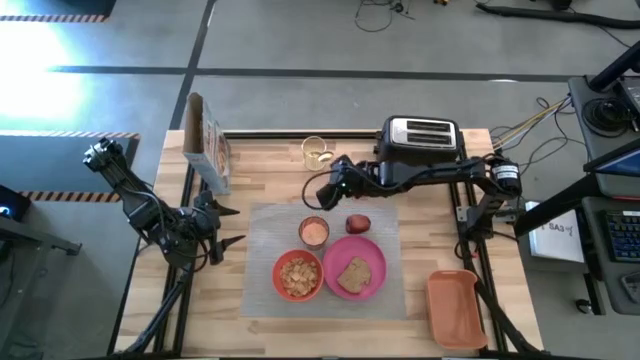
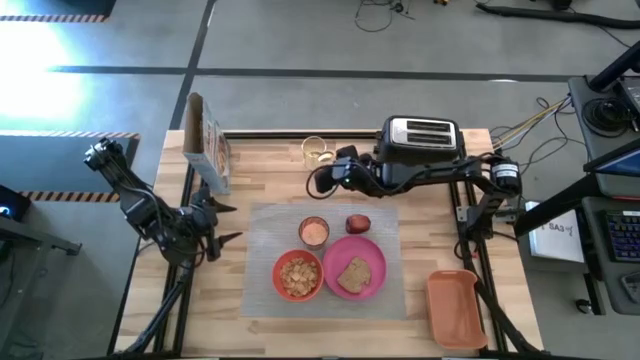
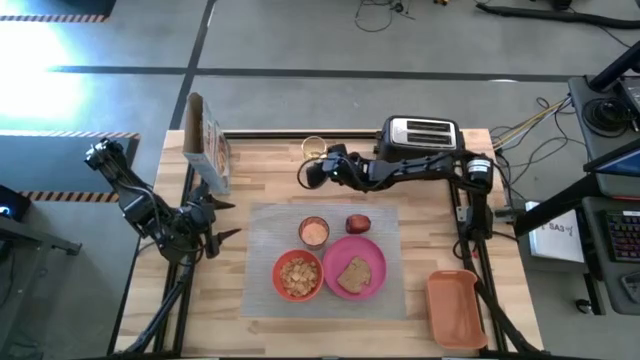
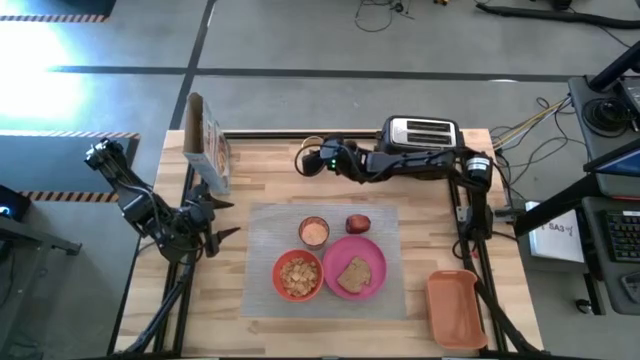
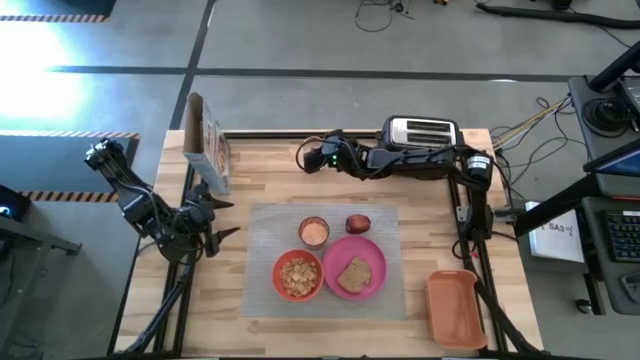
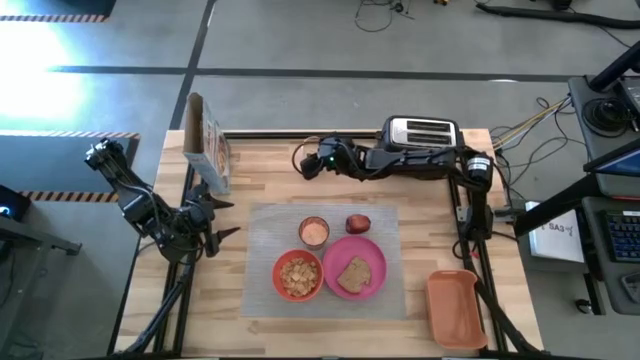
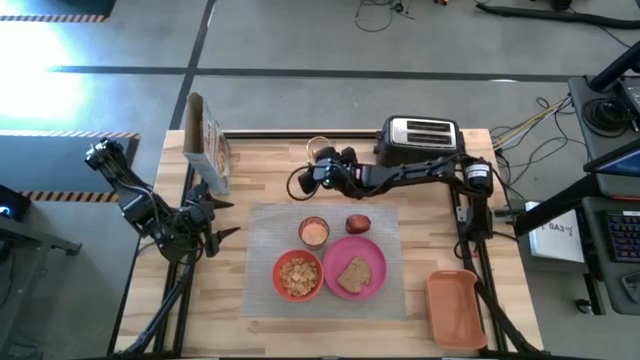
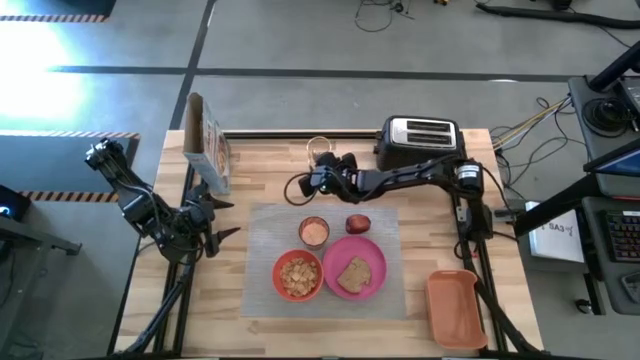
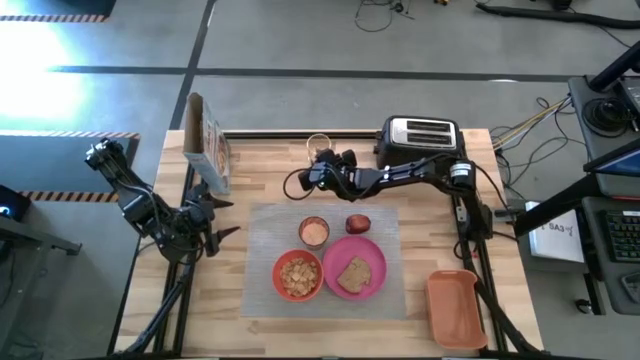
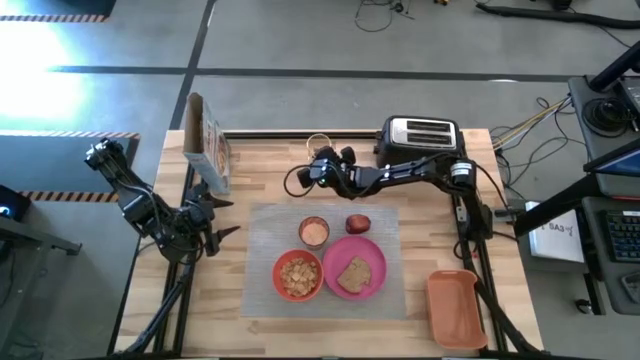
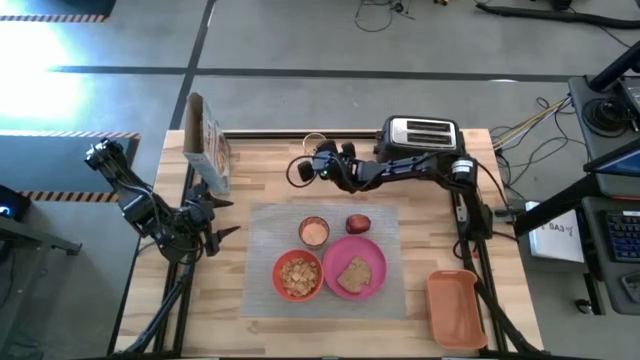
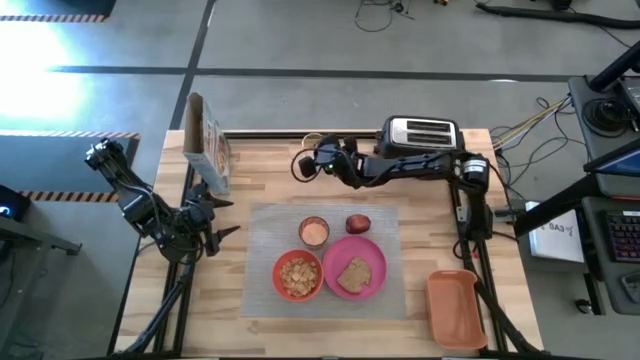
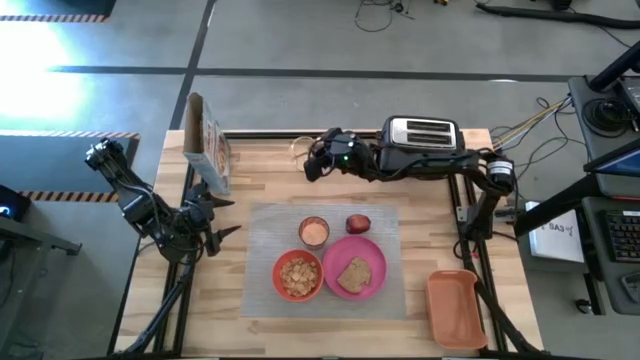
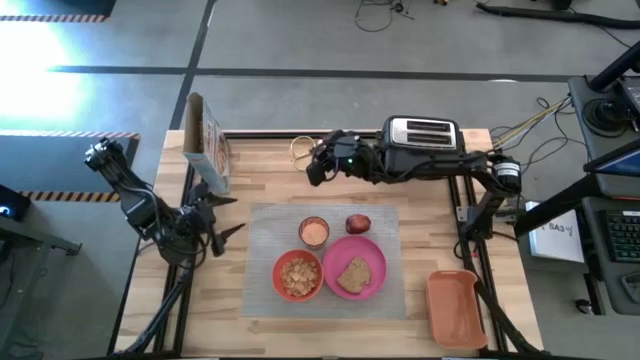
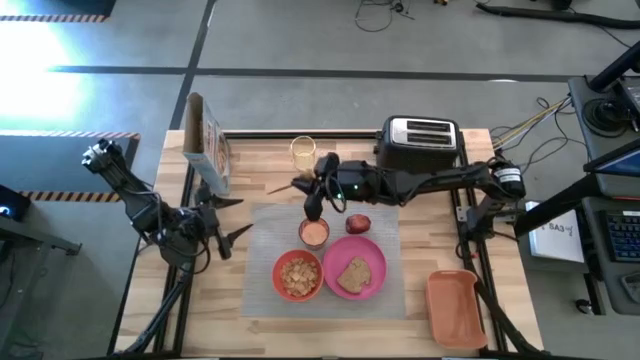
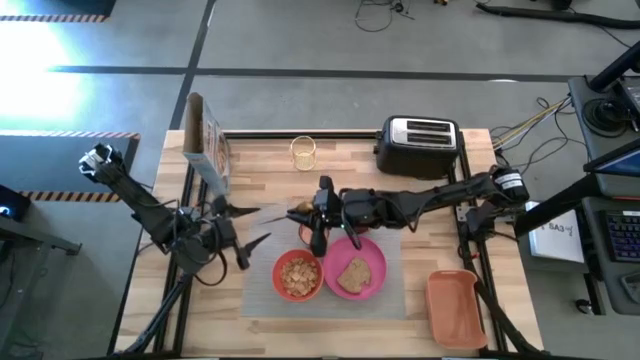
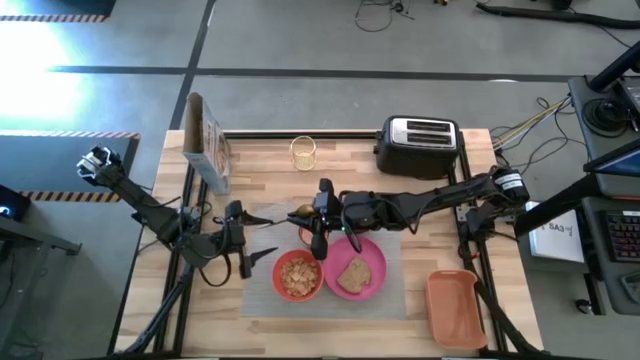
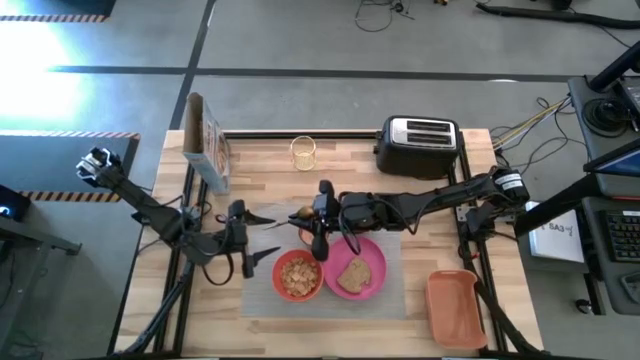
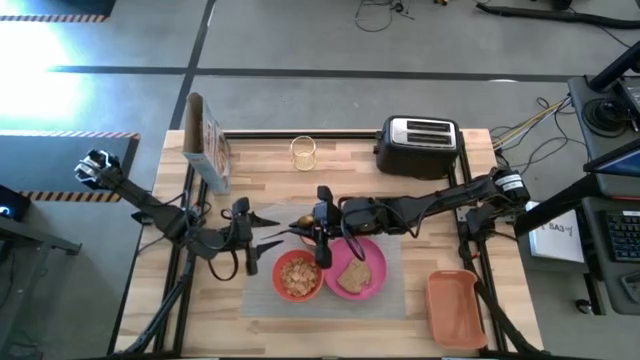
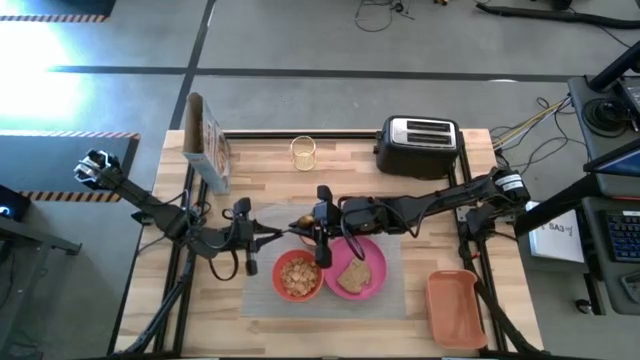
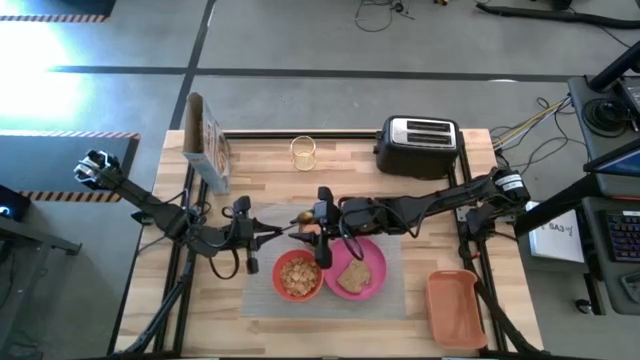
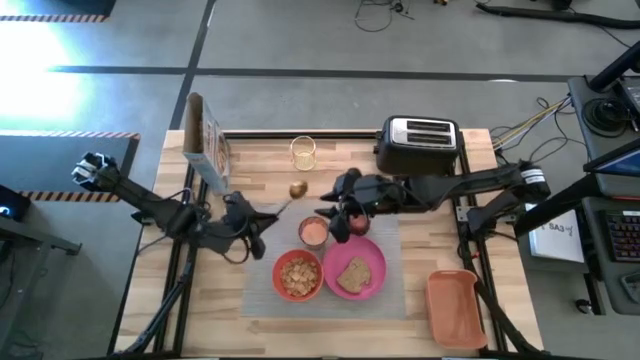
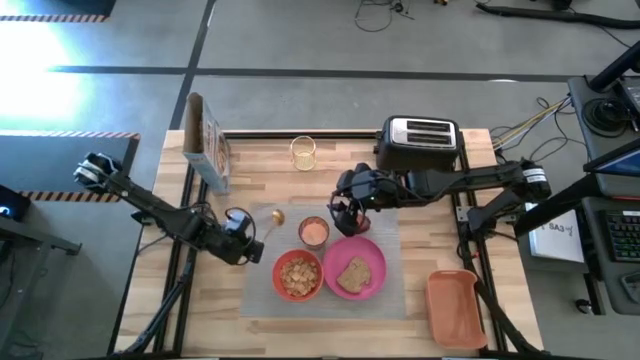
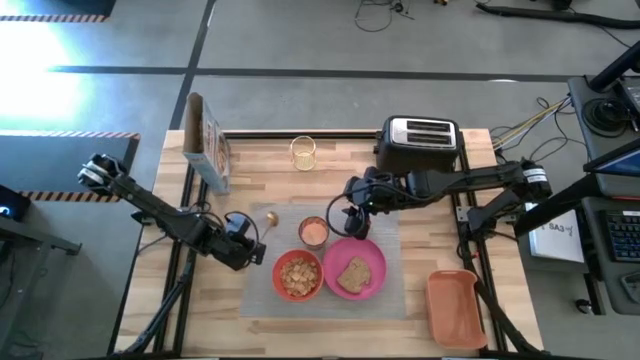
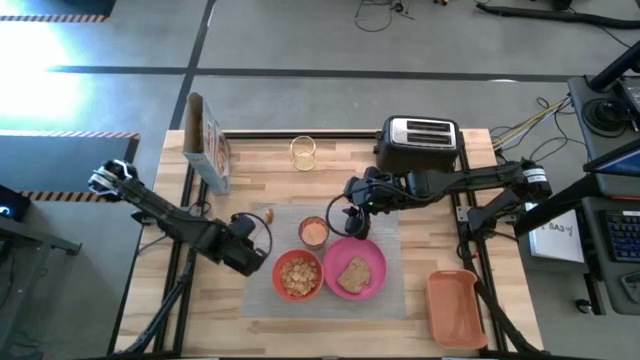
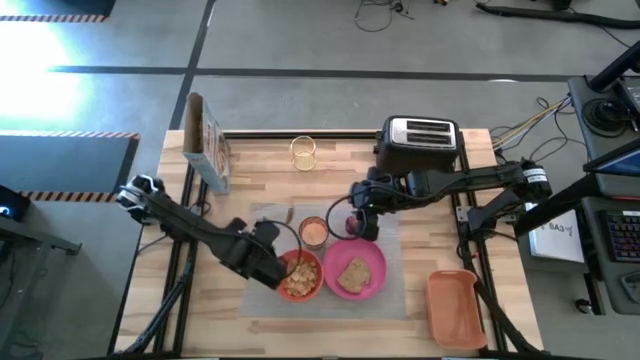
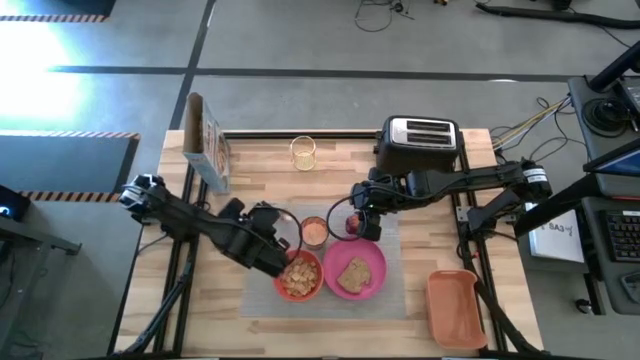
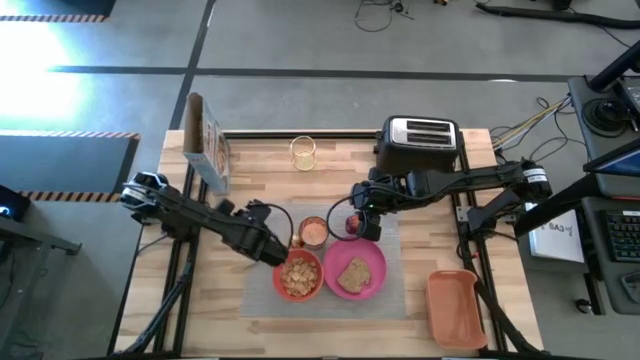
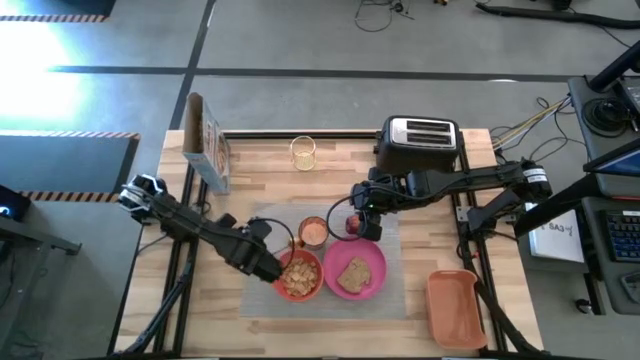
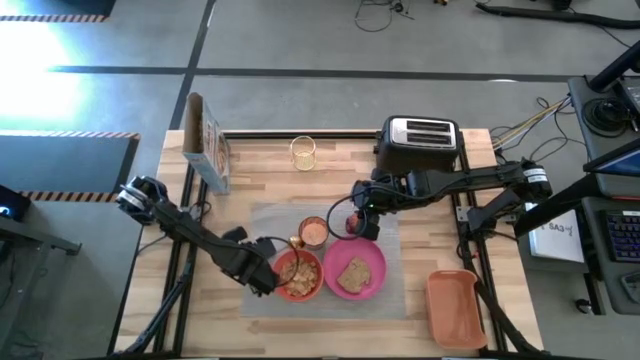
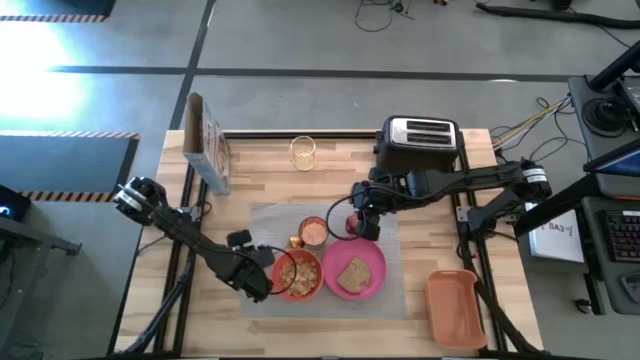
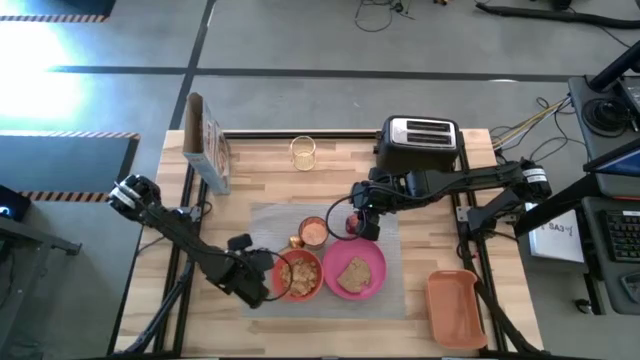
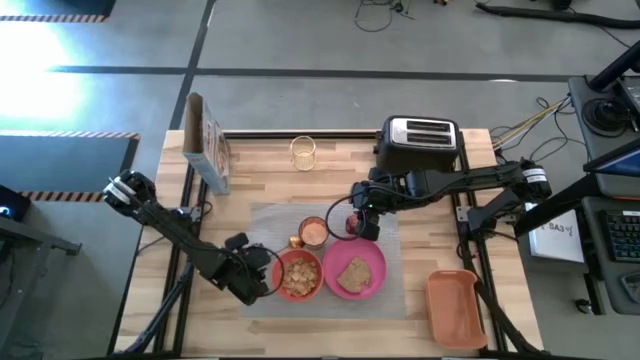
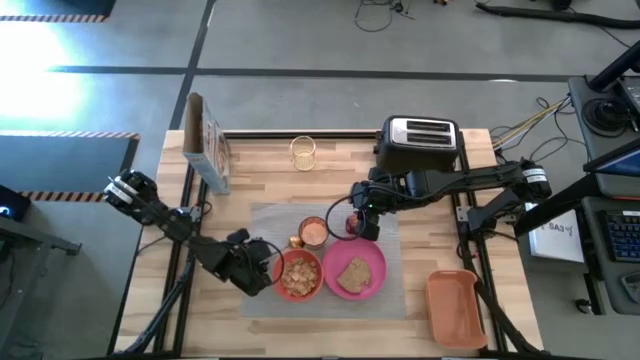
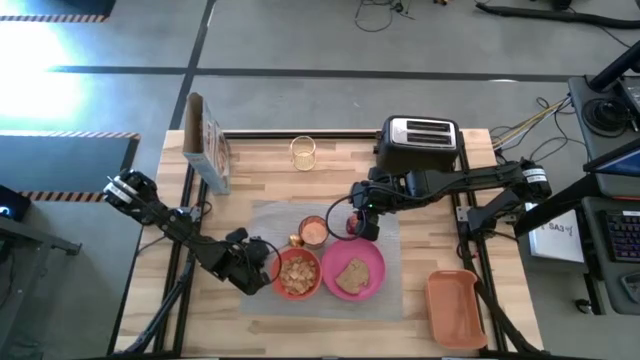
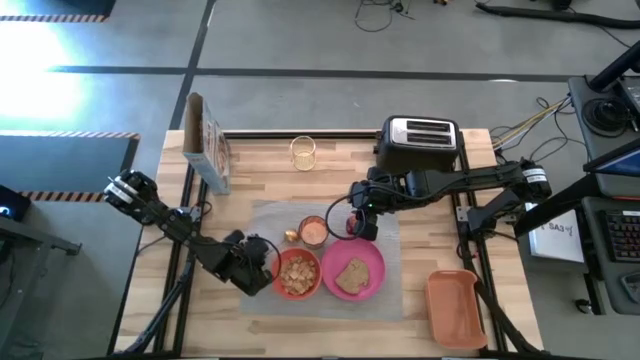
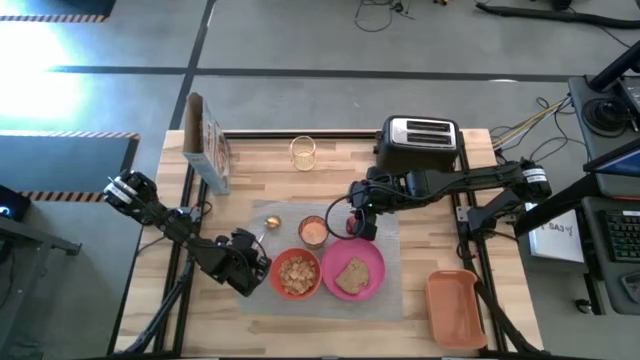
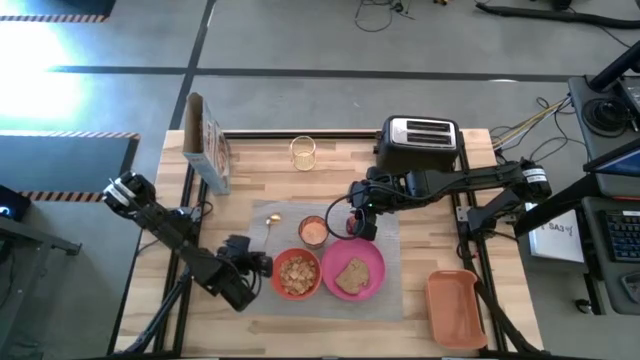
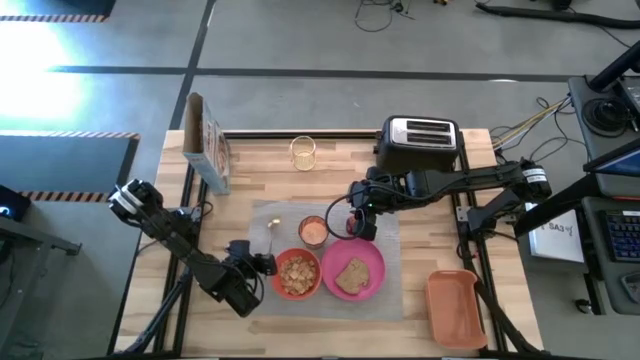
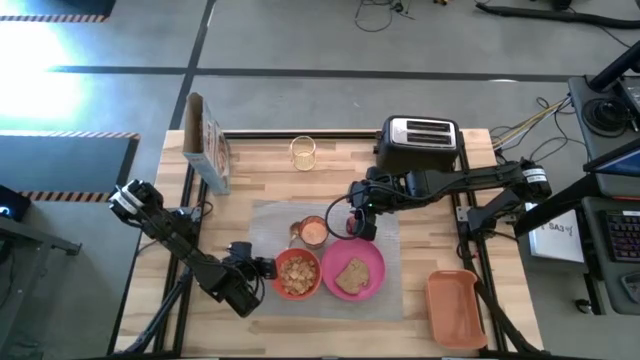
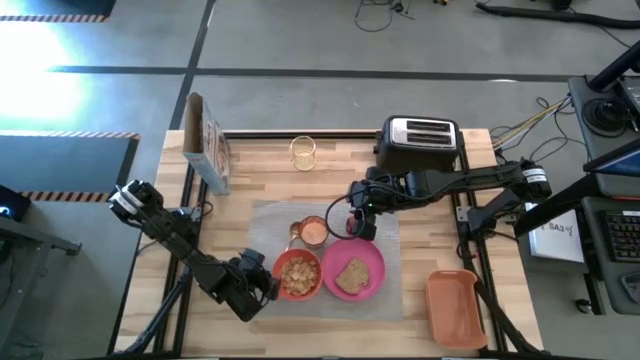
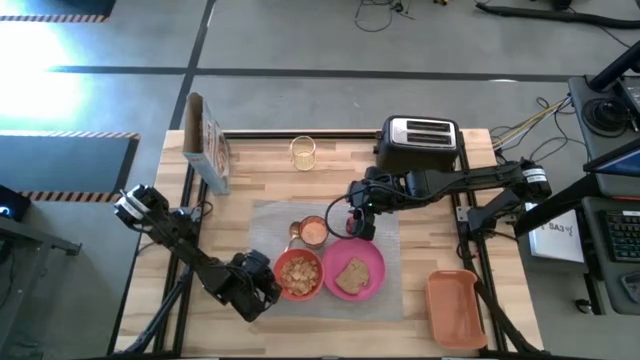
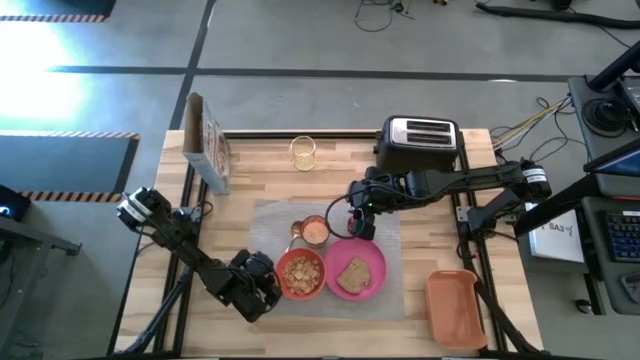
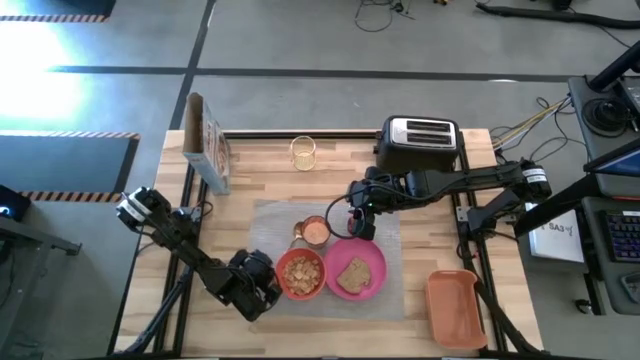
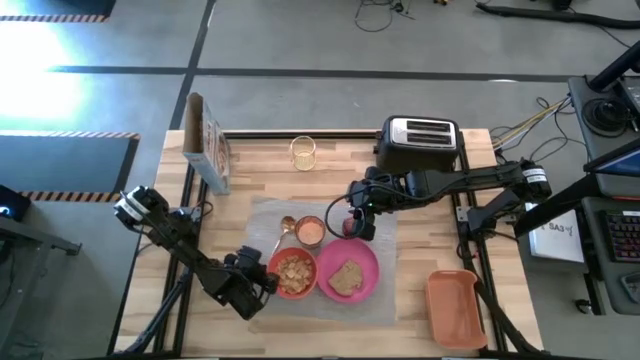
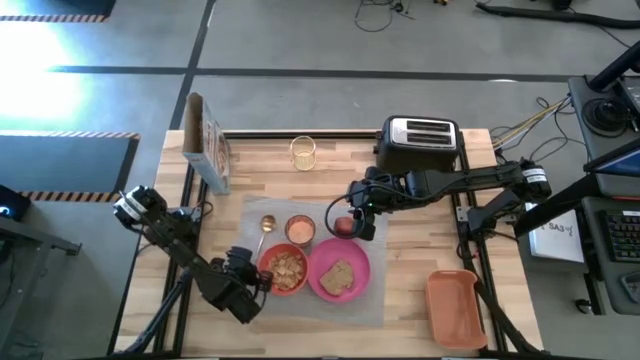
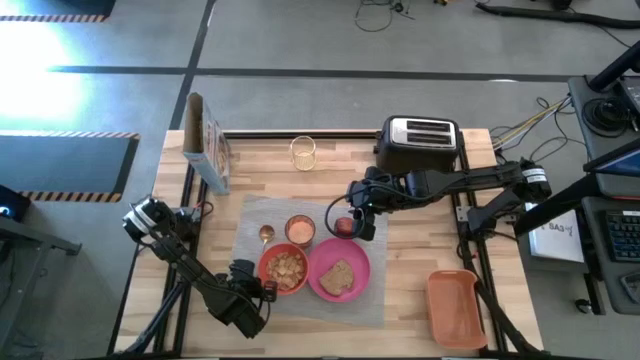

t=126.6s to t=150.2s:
Task: Arrange a breakfast setting
Put the golden spoon to the left of the orange bowl on the gray mat
